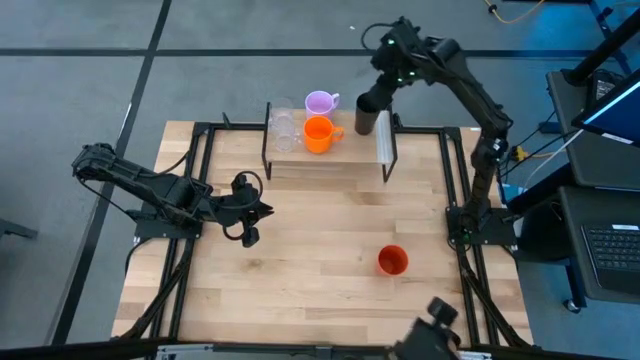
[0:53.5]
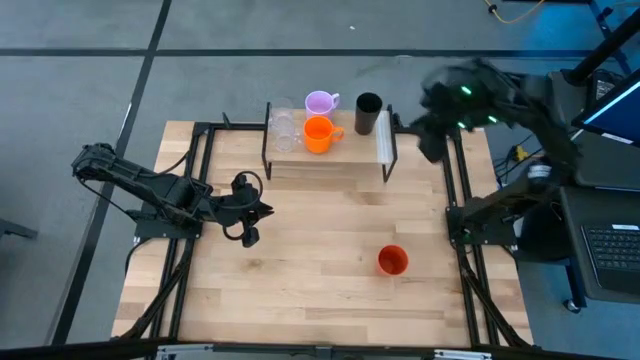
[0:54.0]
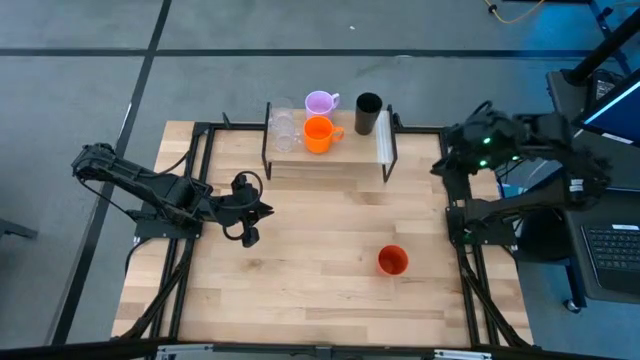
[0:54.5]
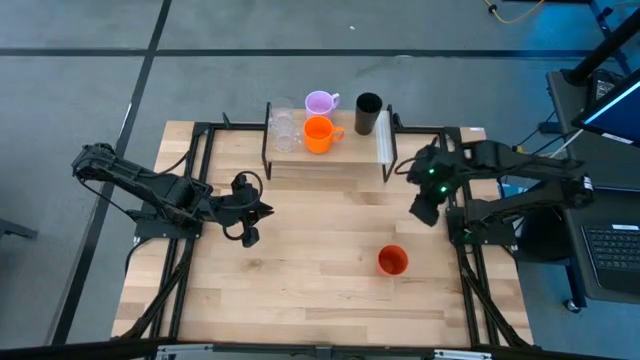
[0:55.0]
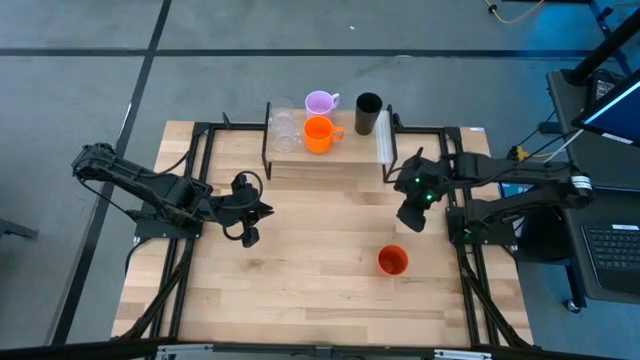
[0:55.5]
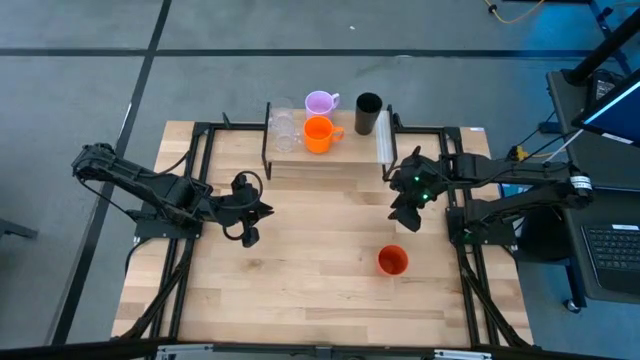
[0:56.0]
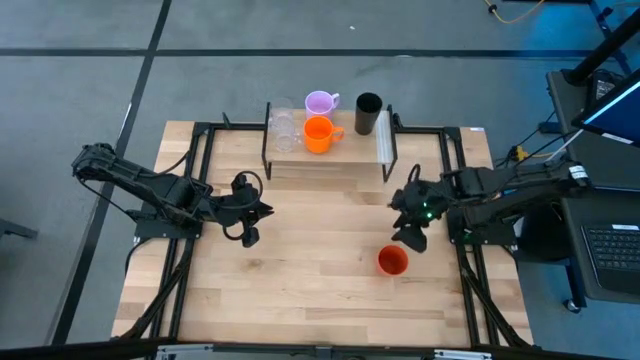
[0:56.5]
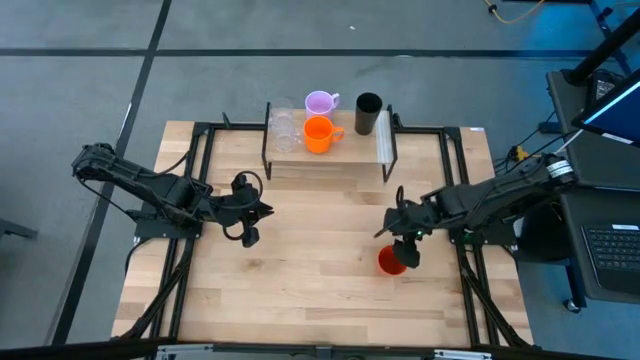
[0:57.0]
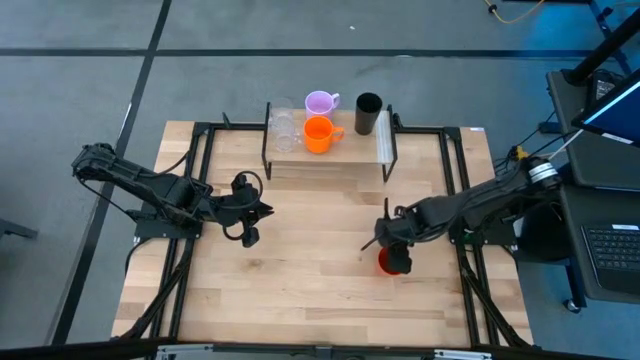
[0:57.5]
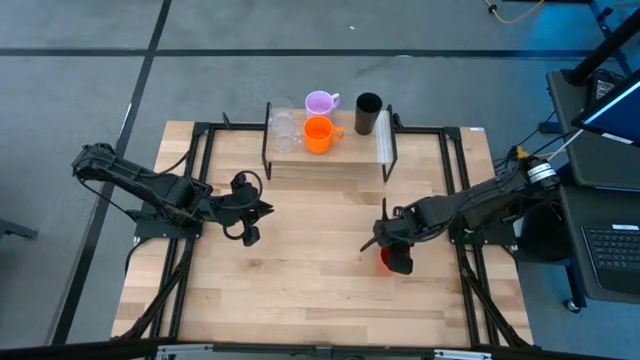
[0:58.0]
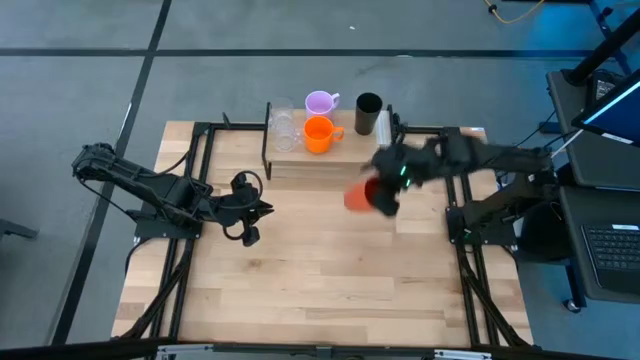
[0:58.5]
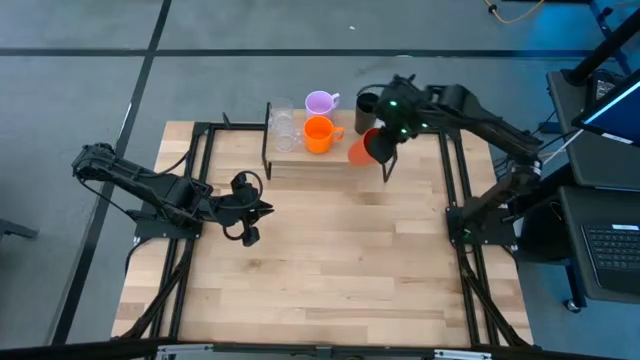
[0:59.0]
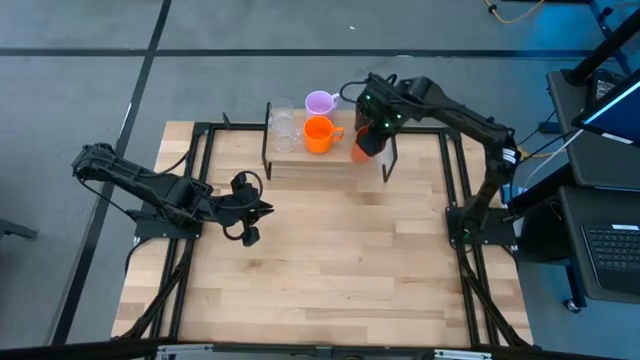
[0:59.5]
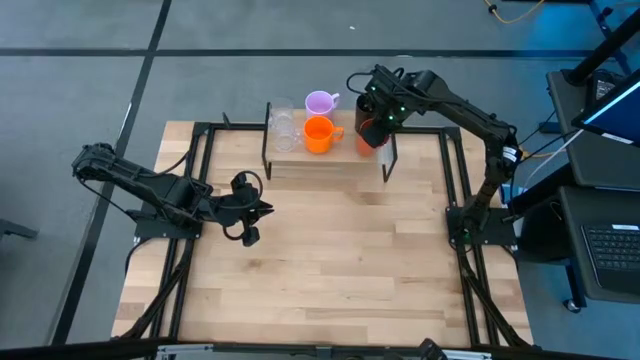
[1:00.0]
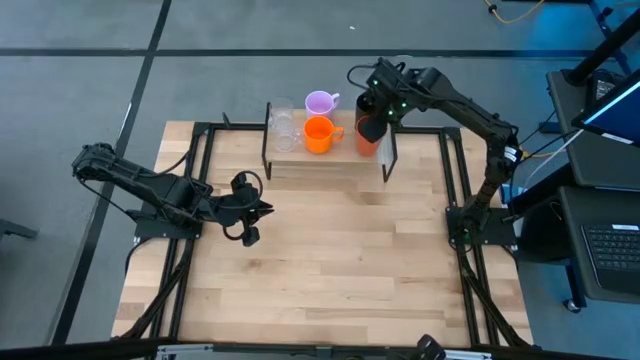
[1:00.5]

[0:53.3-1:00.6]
Task: Stack small to large cups/mugs on shelf
Put the orange cup on the shelf

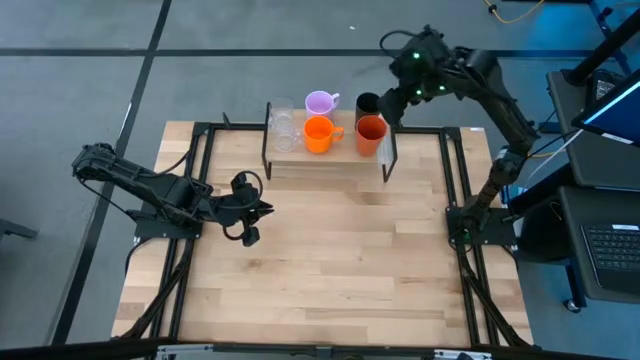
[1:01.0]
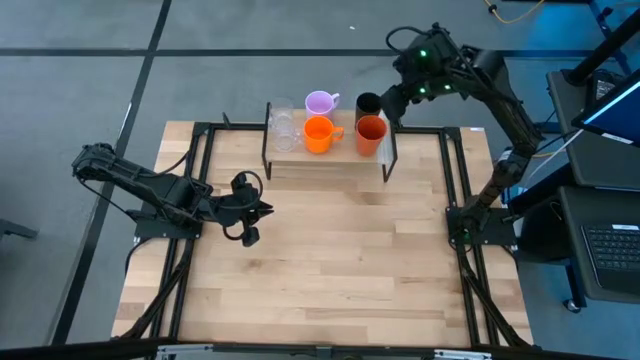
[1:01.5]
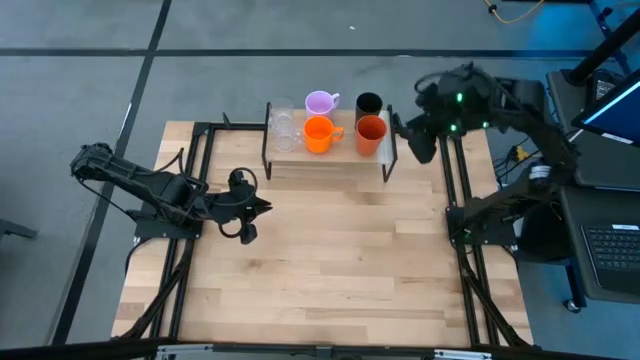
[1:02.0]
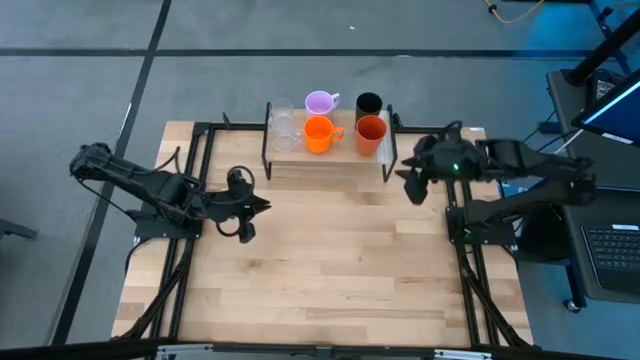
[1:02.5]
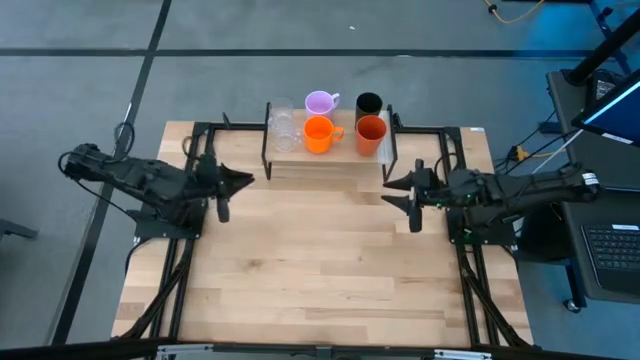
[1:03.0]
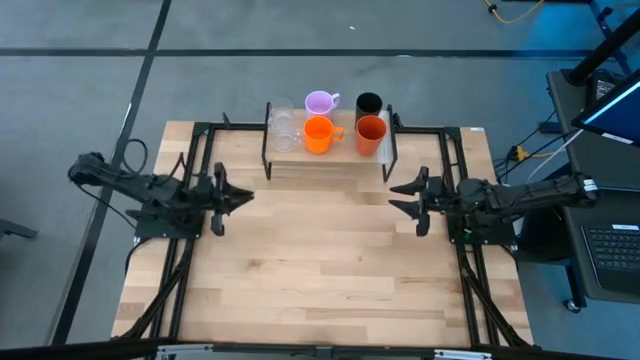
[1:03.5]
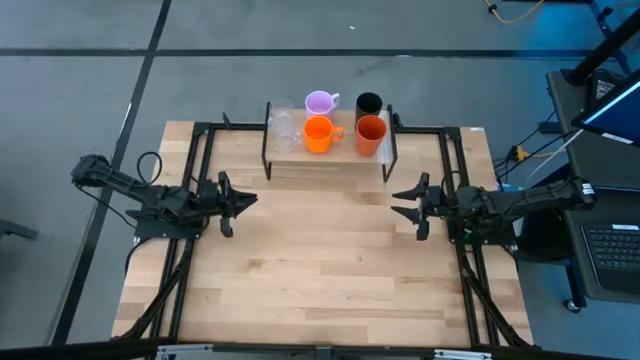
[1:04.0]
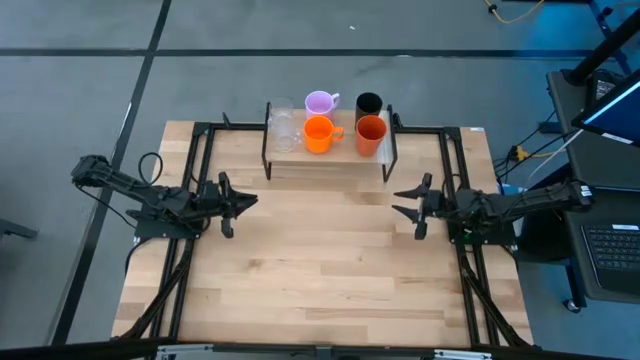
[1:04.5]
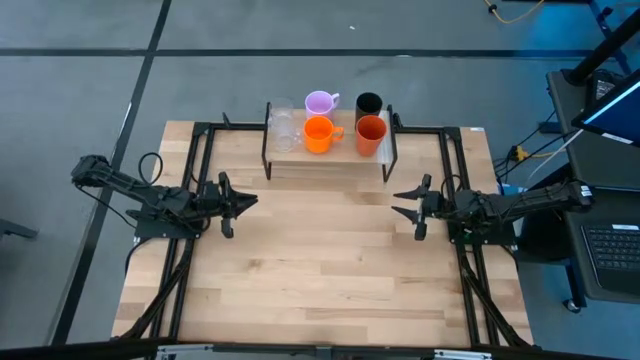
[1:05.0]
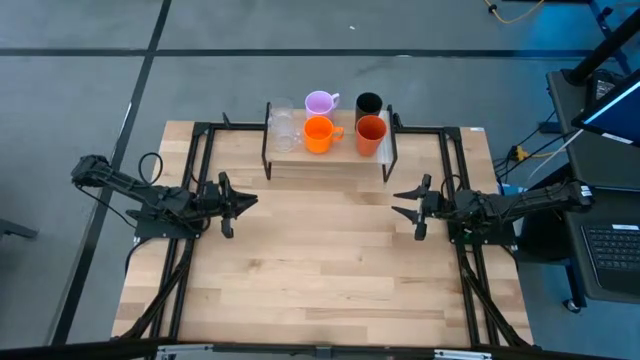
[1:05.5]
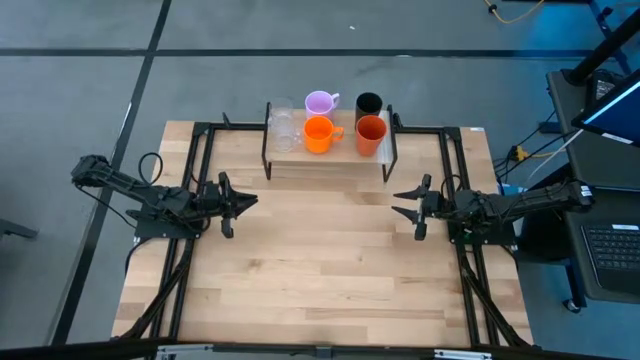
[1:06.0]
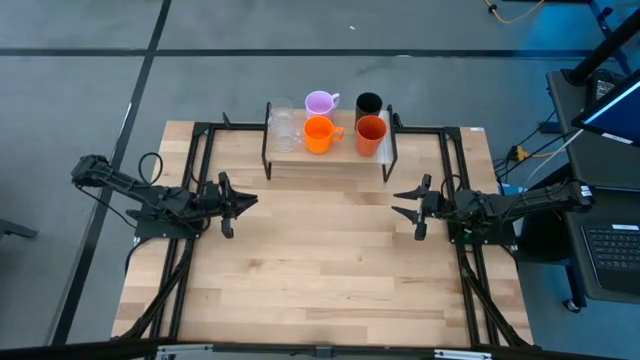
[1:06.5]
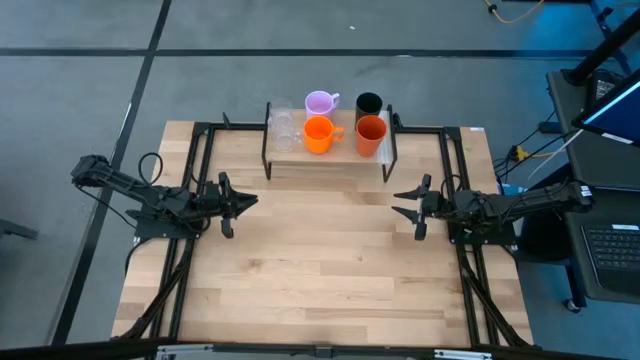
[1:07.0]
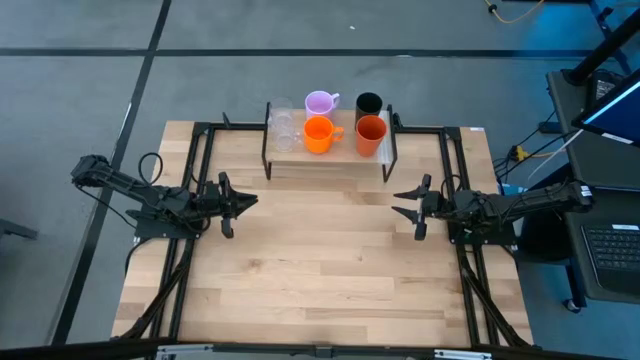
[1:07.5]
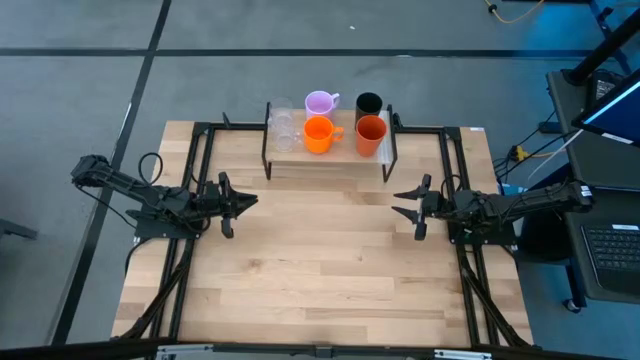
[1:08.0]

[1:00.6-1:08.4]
Return to Home Position

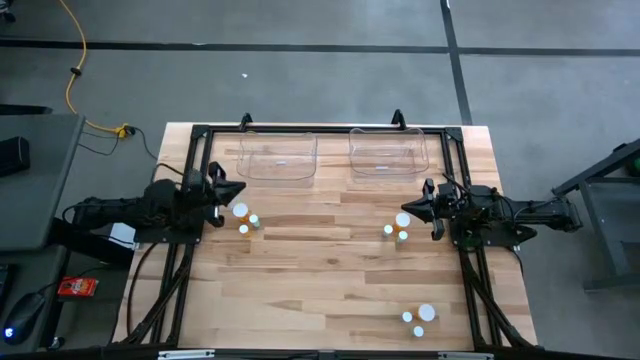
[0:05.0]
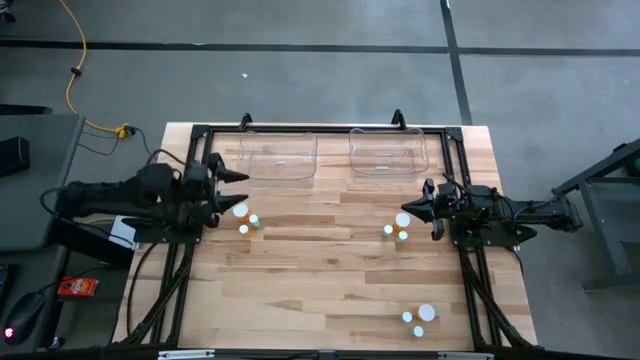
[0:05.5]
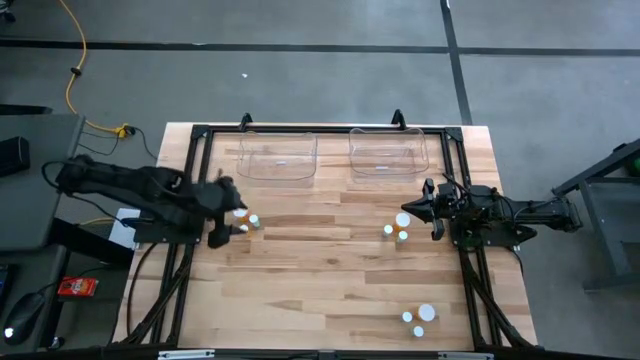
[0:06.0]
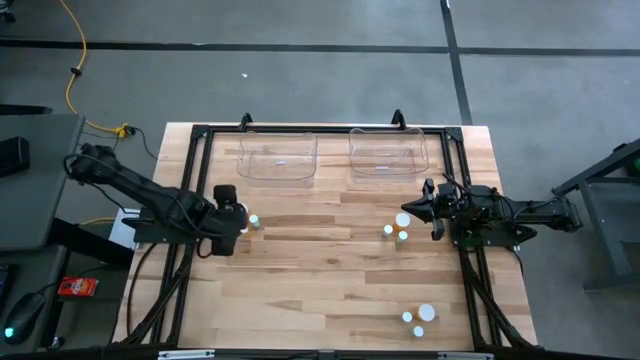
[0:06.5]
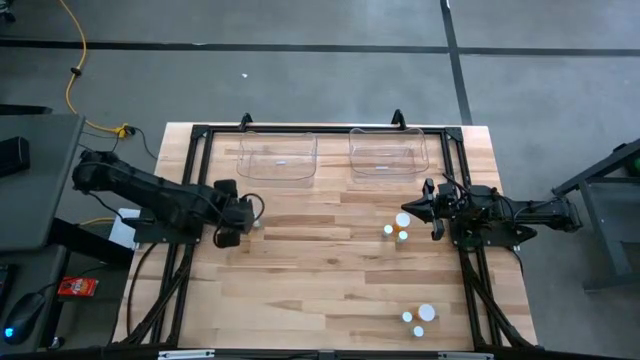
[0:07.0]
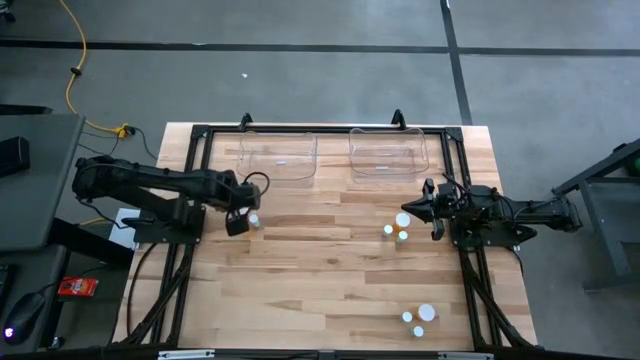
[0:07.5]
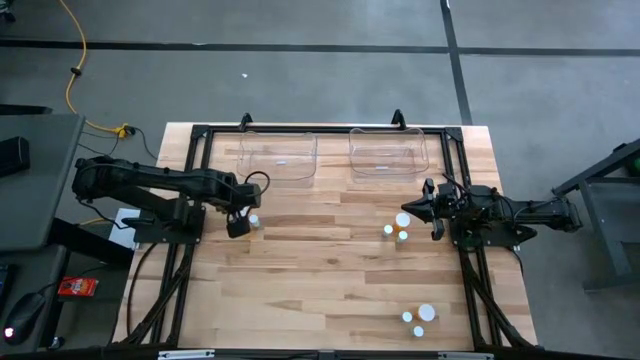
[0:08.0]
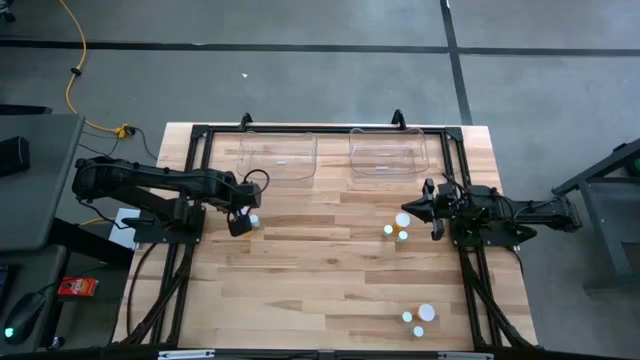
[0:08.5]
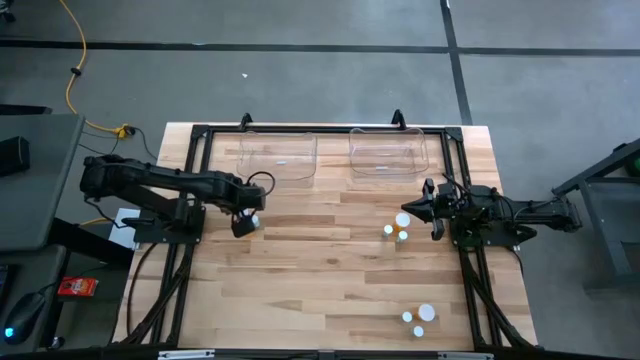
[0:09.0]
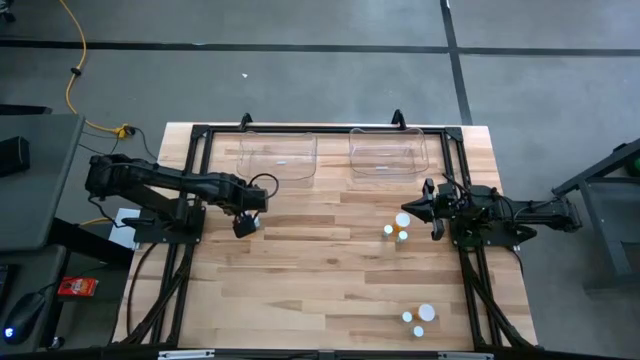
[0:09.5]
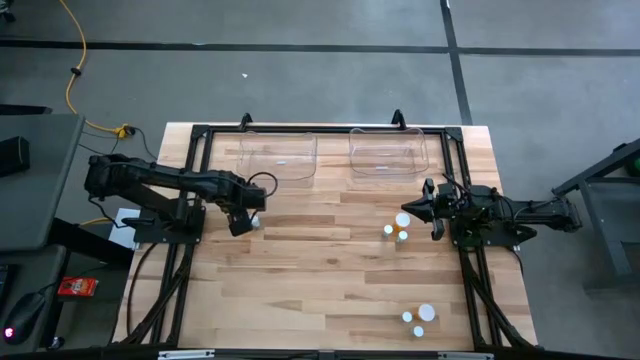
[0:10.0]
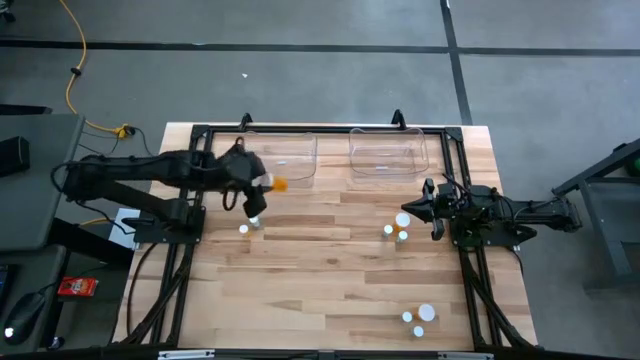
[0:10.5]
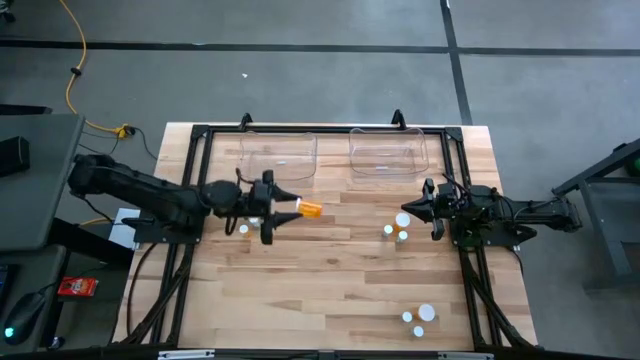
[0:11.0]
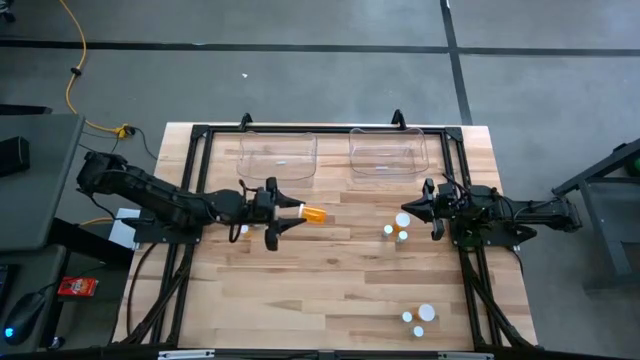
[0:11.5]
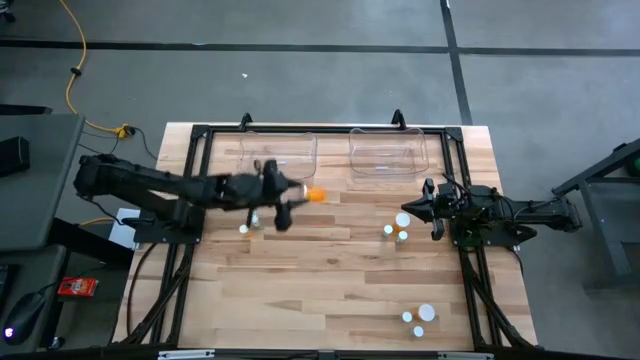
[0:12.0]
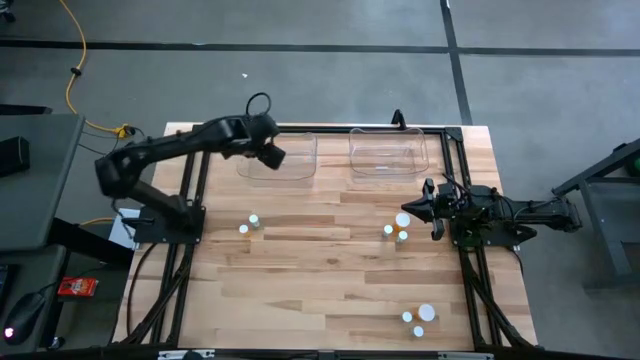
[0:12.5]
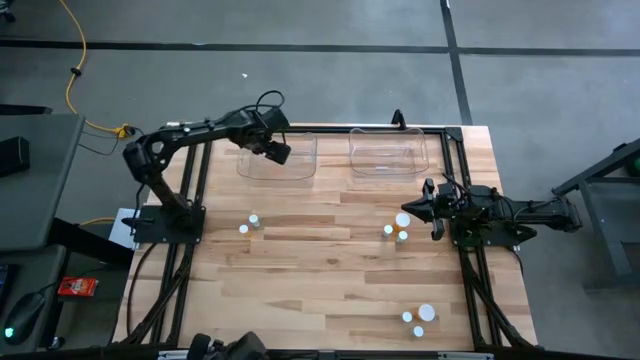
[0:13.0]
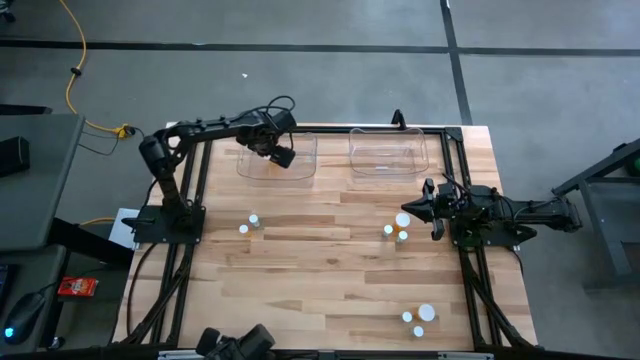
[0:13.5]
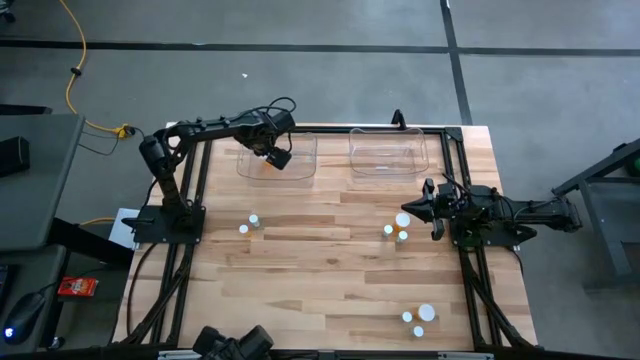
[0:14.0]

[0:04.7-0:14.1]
Task: Pick and place medicine bottles into bin by pill shape (circle, oval)
Put the top left orange capsule bottle into the left transparent bin
